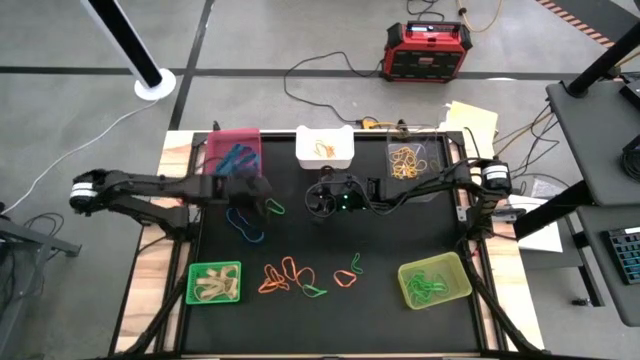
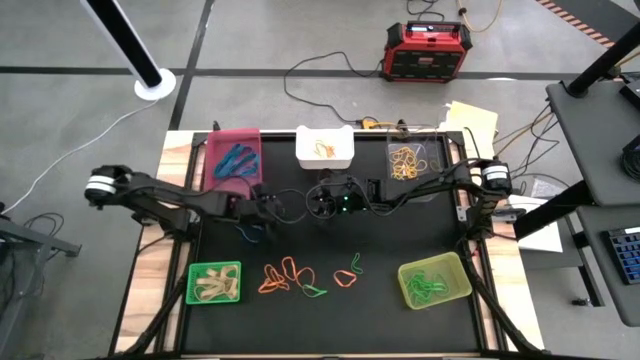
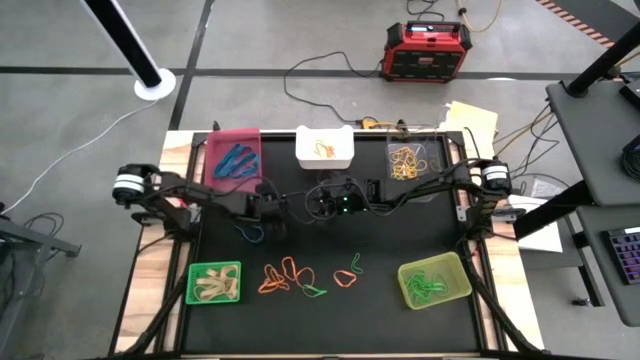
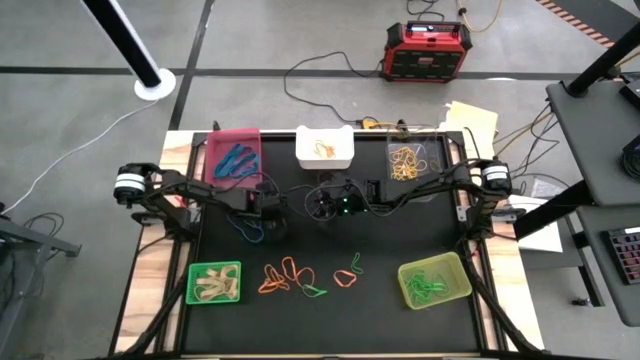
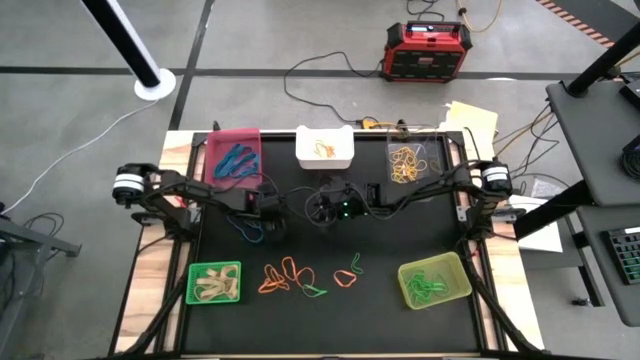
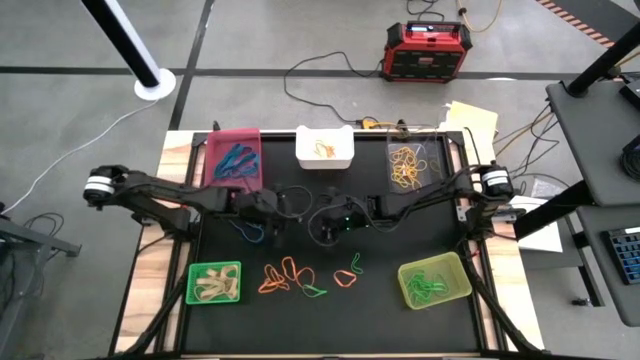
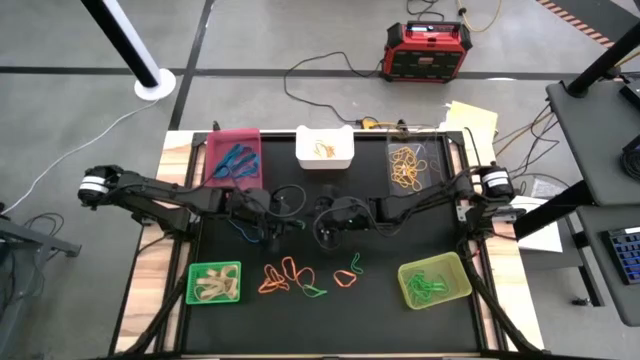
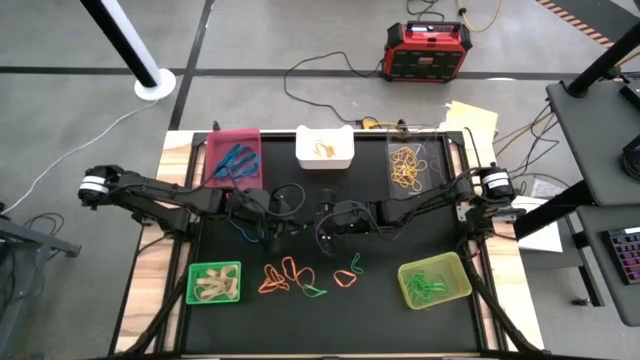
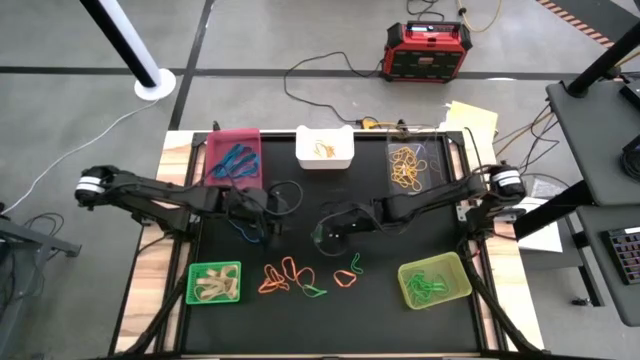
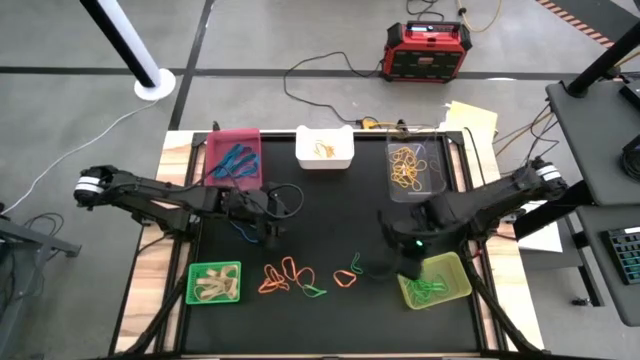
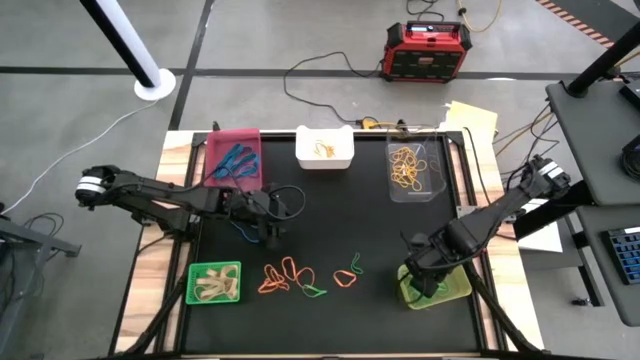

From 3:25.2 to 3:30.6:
Task: Sort rubber bands into baskets
Put the green rubber band into the yellow bin

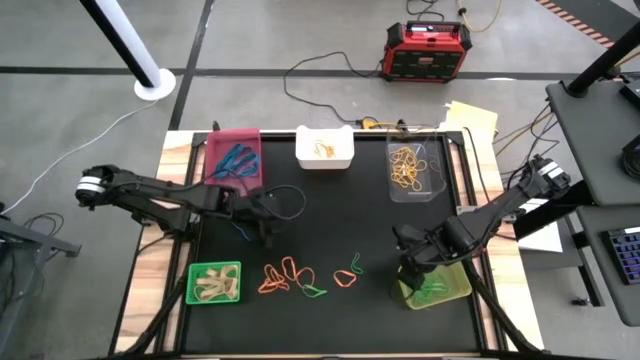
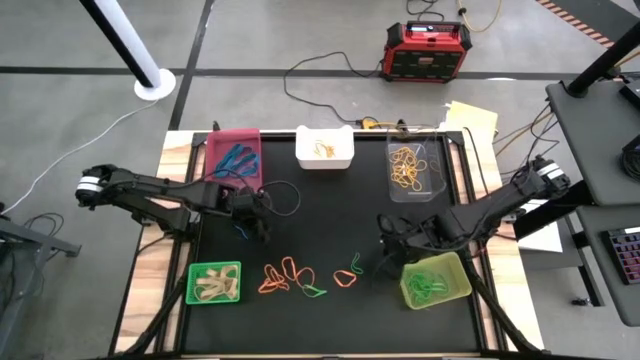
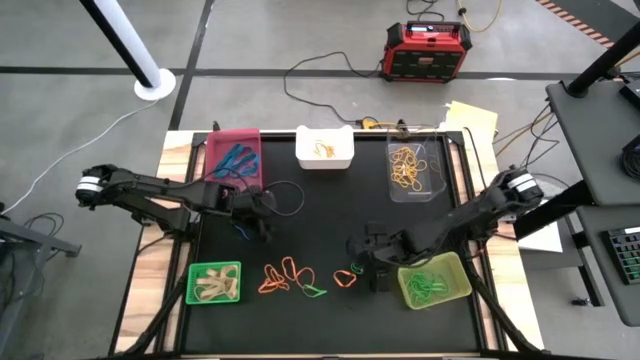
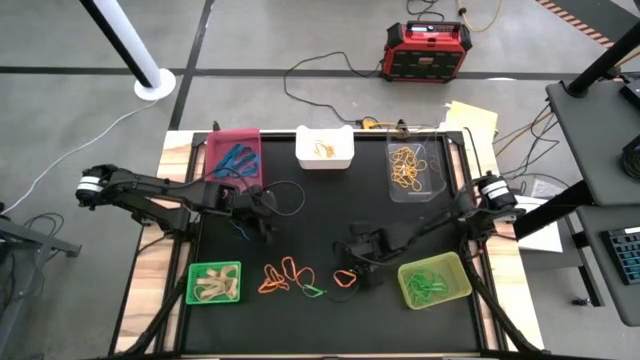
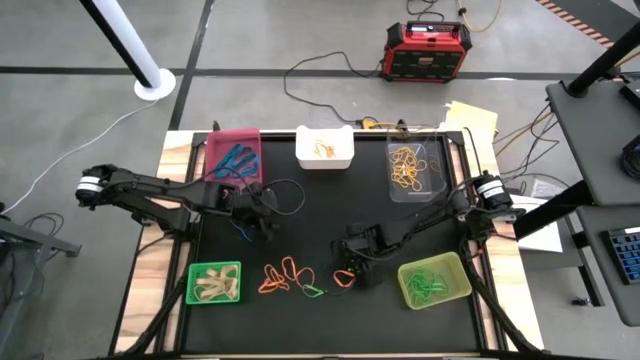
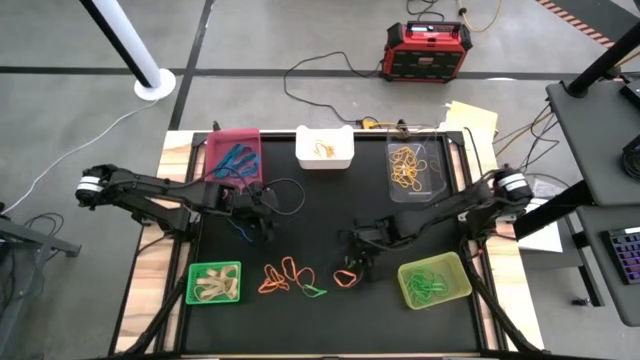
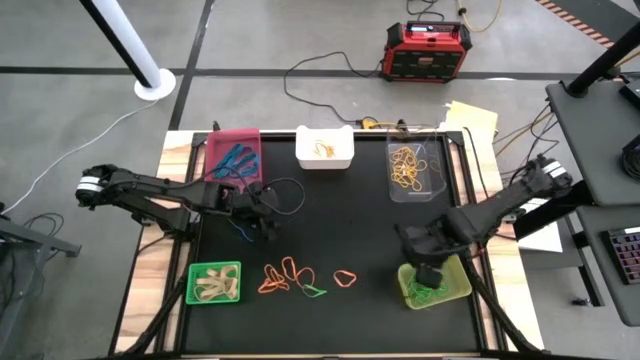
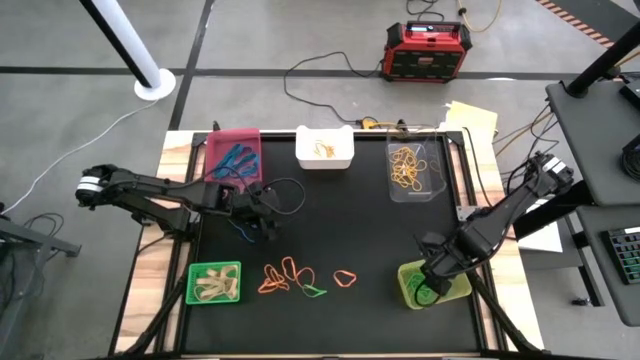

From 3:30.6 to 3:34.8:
Put the green rubber band into the yellow bin

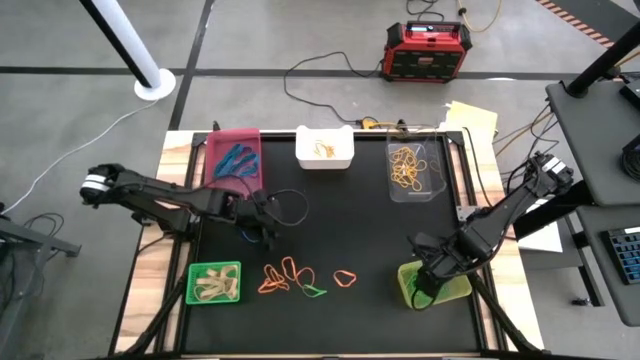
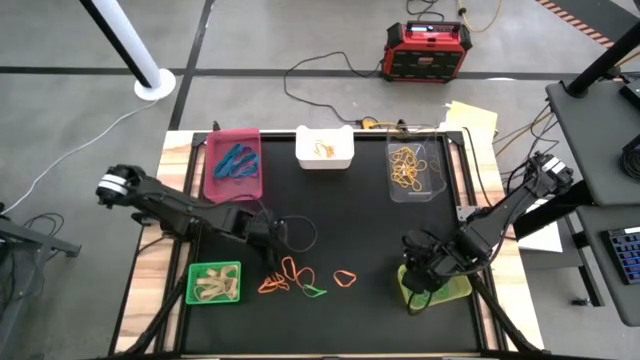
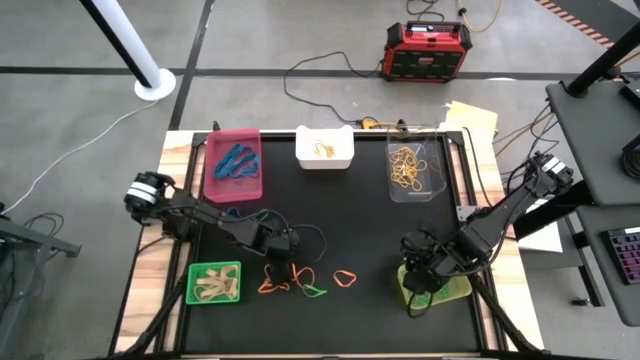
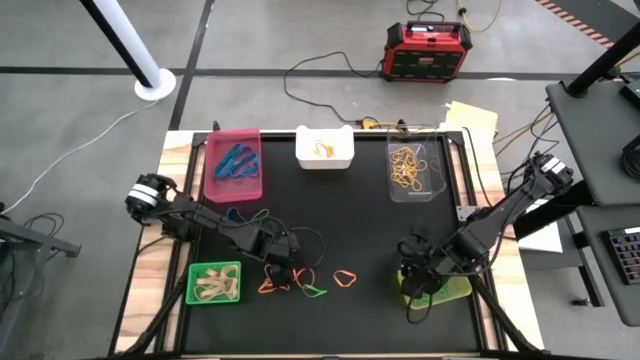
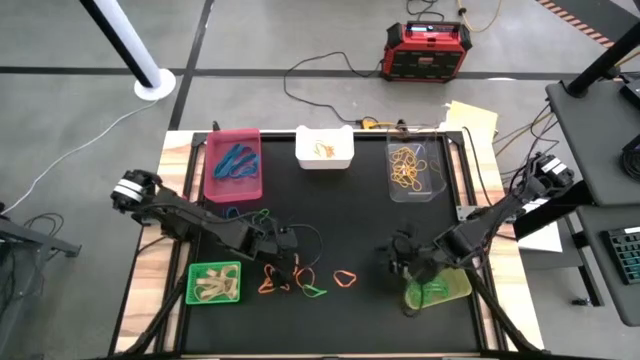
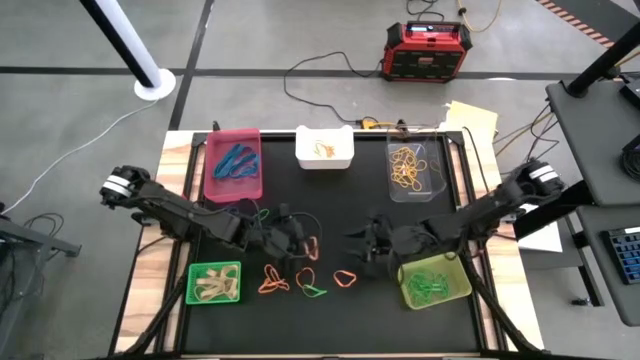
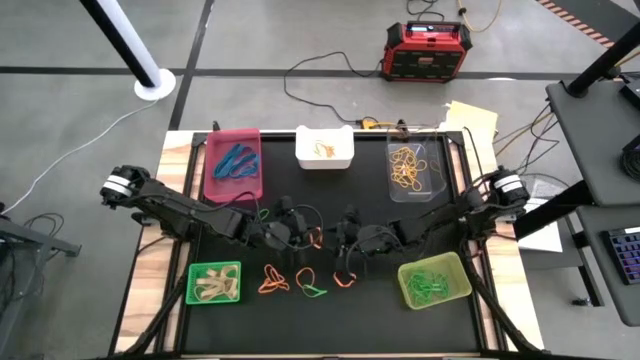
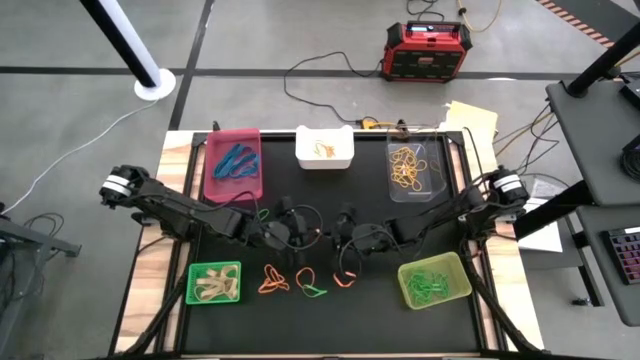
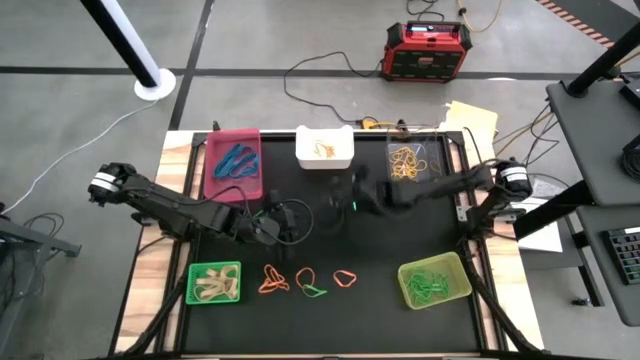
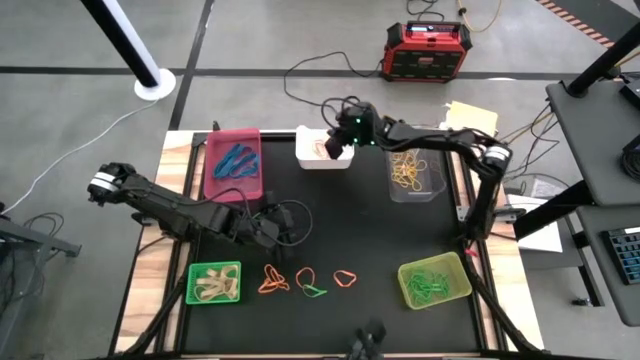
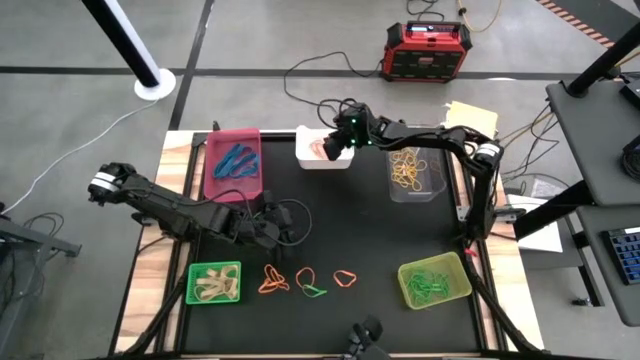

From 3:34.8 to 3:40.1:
Put the orange rubber band into the white bin

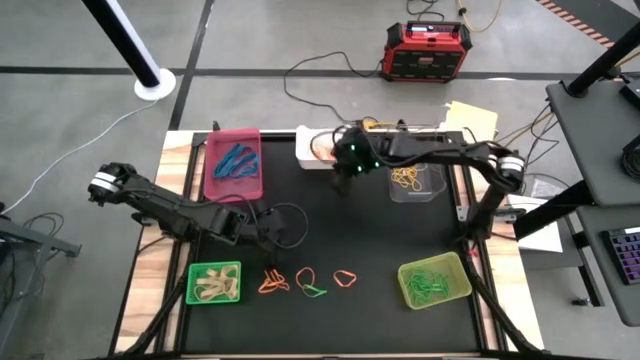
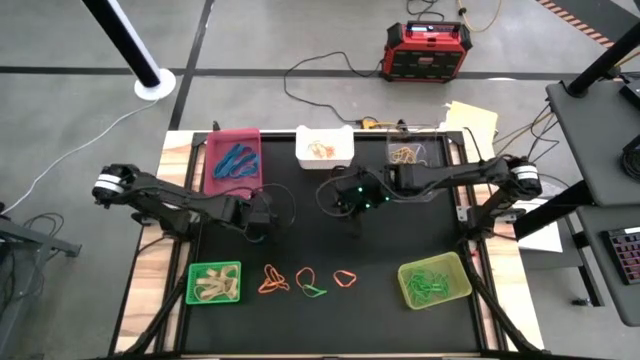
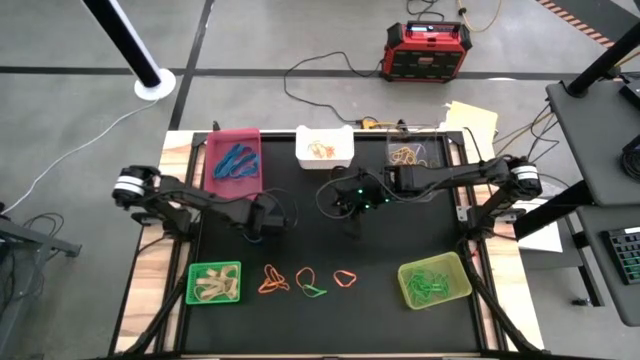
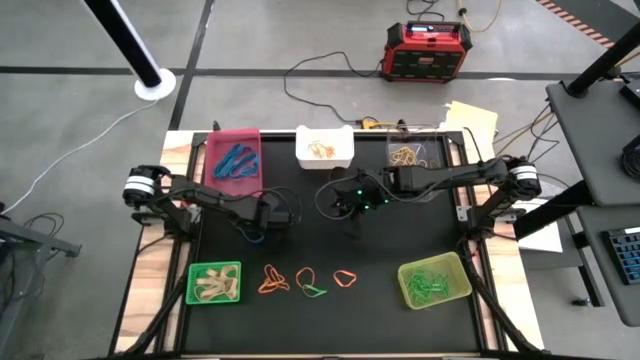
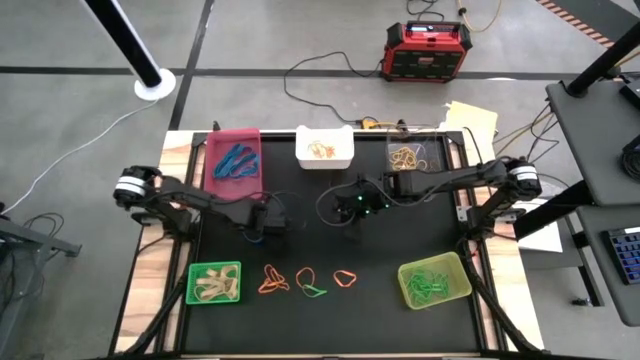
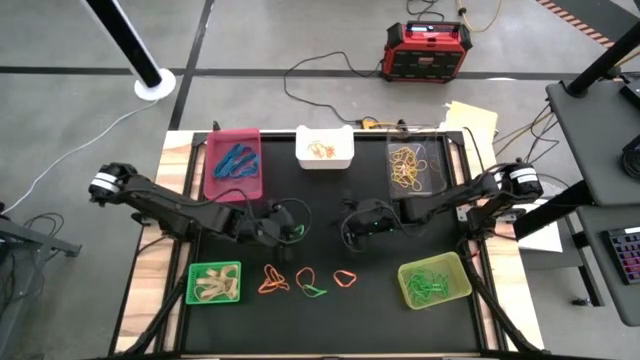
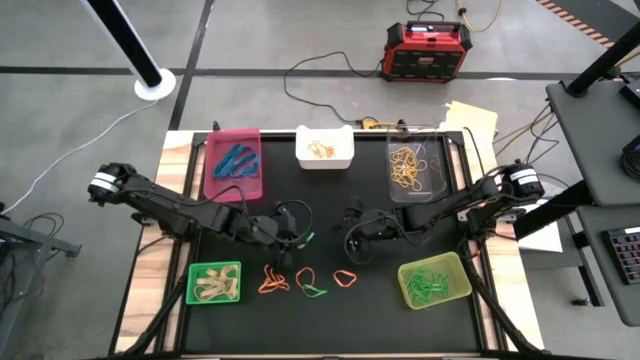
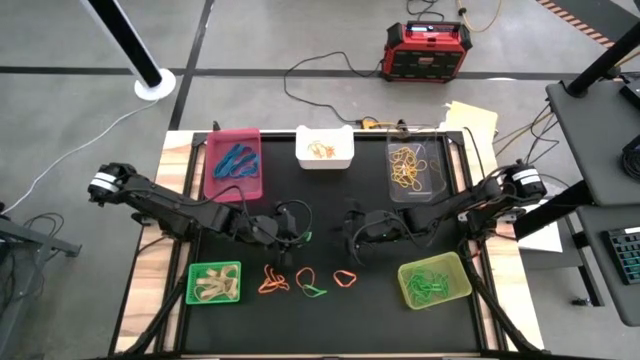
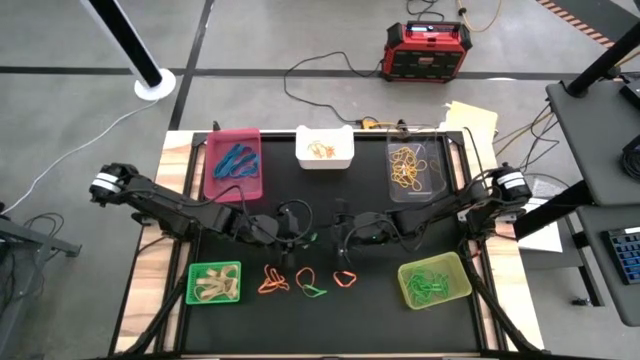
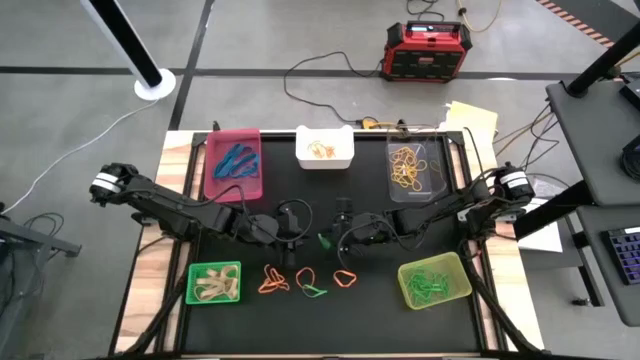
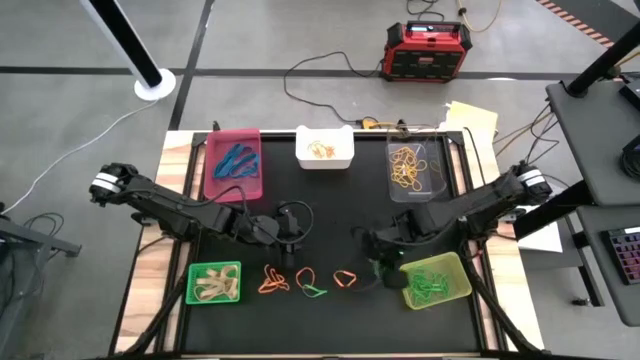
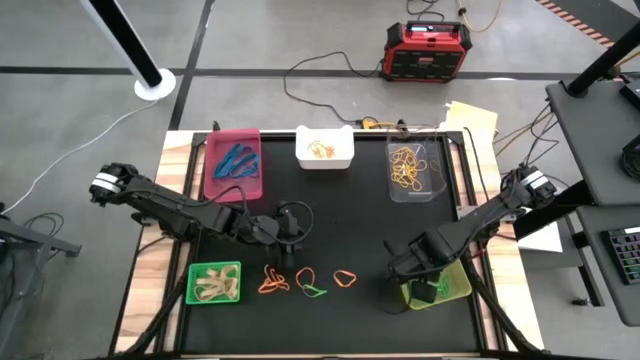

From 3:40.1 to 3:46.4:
Put the green rubber band into the yellow bin

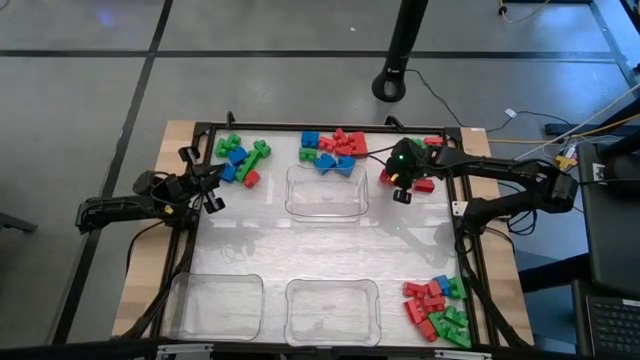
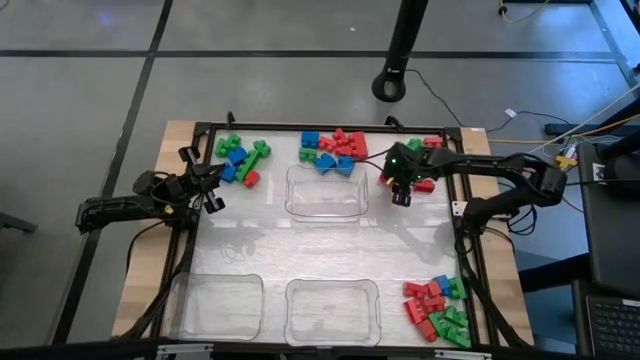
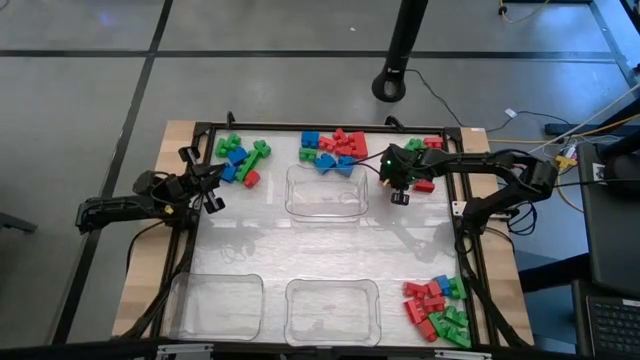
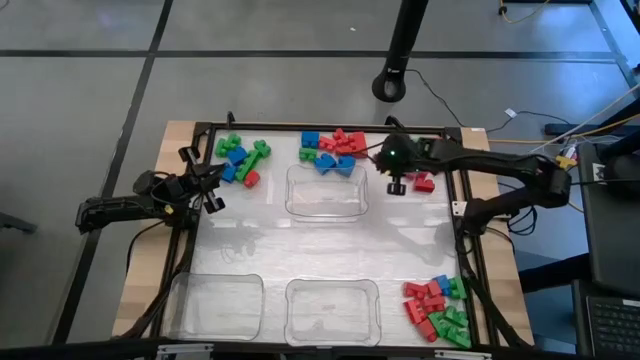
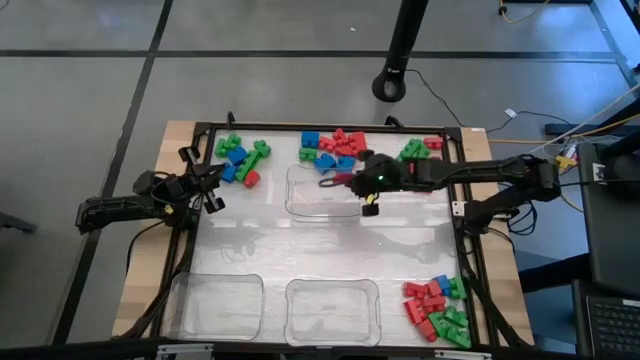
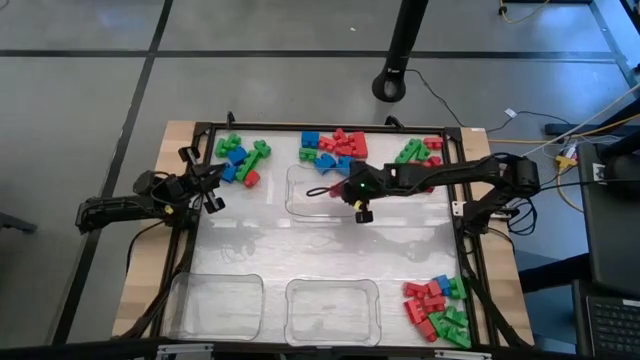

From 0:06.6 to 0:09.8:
Task: Sort blocks
Put the red game piece into the top right transparent bin
